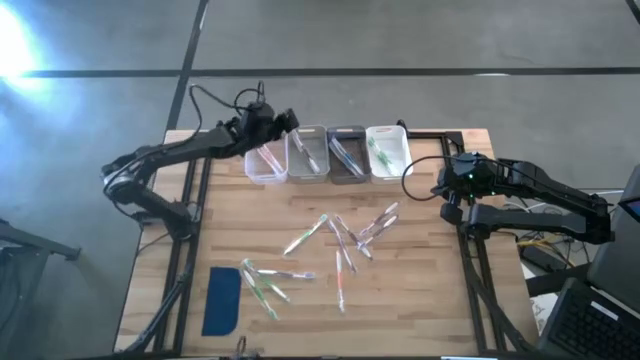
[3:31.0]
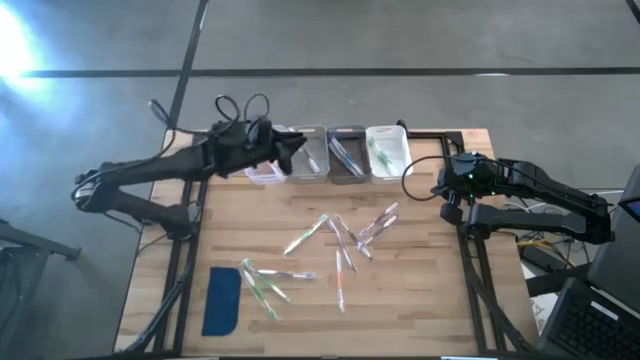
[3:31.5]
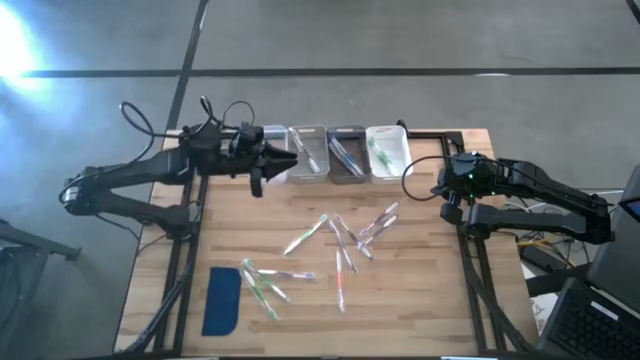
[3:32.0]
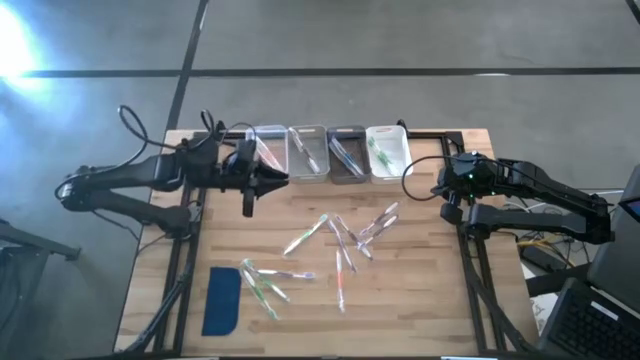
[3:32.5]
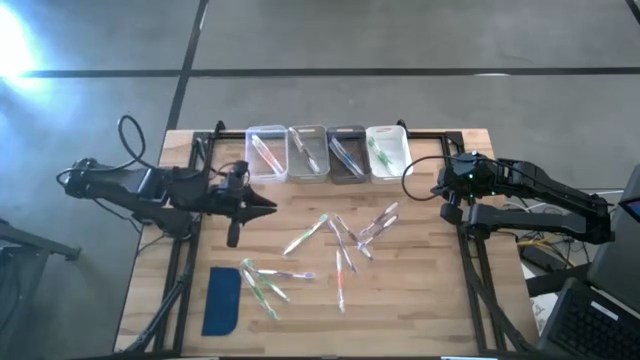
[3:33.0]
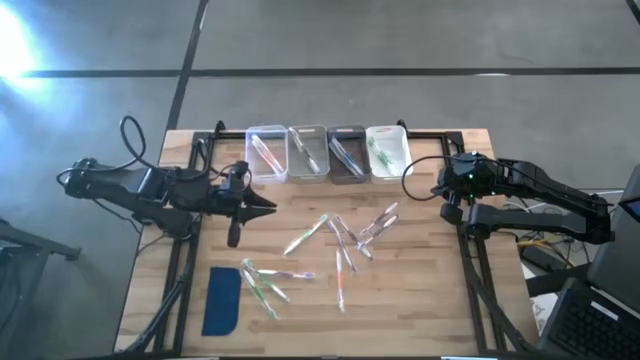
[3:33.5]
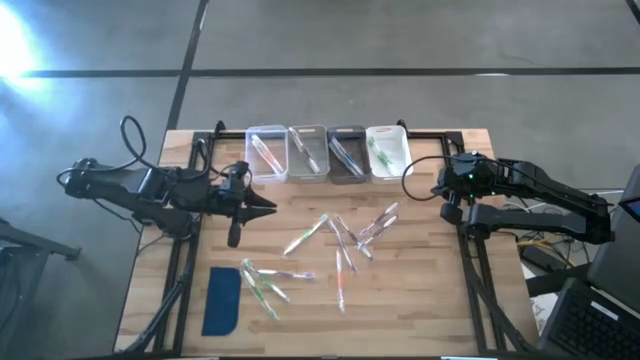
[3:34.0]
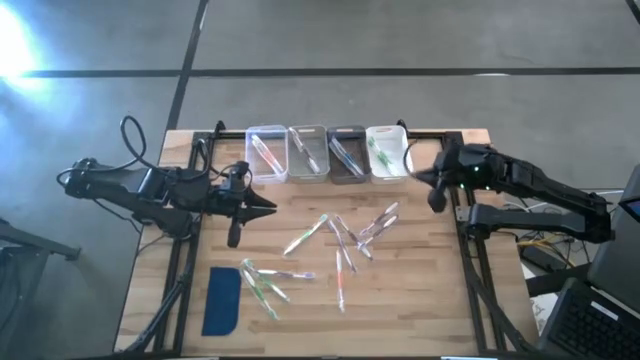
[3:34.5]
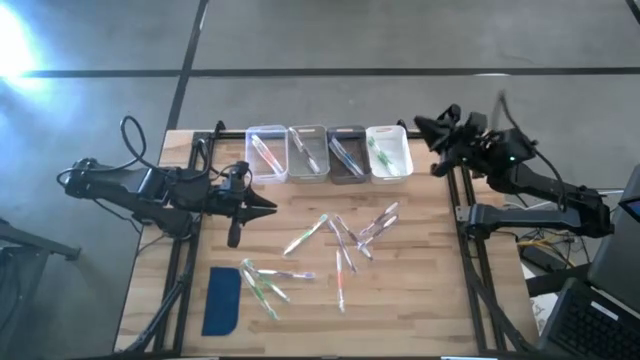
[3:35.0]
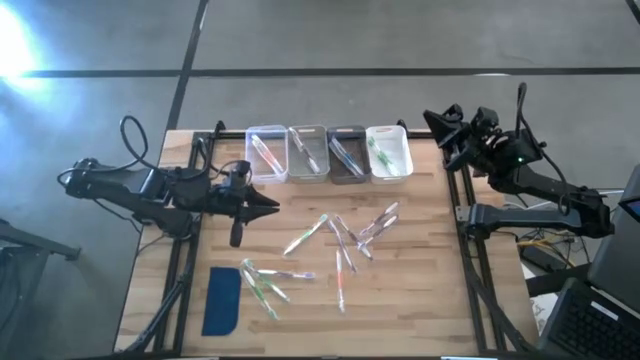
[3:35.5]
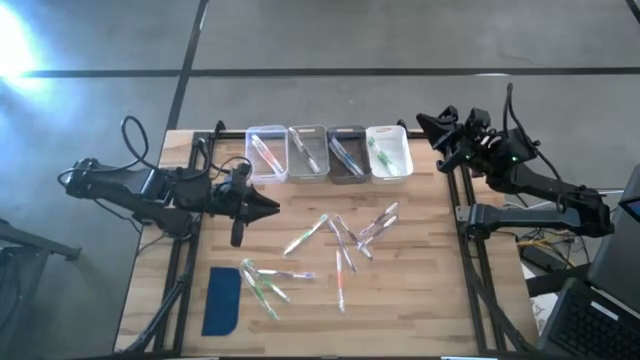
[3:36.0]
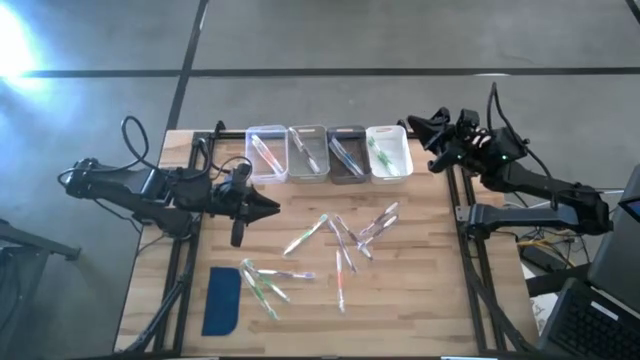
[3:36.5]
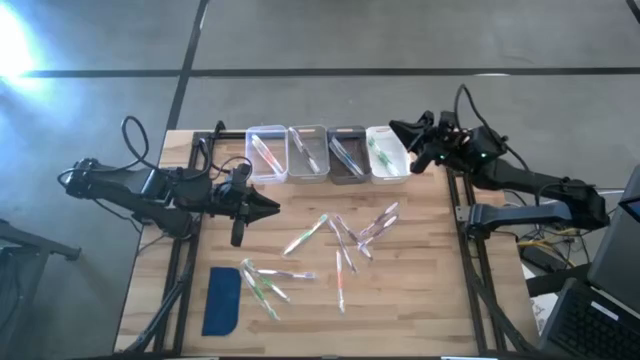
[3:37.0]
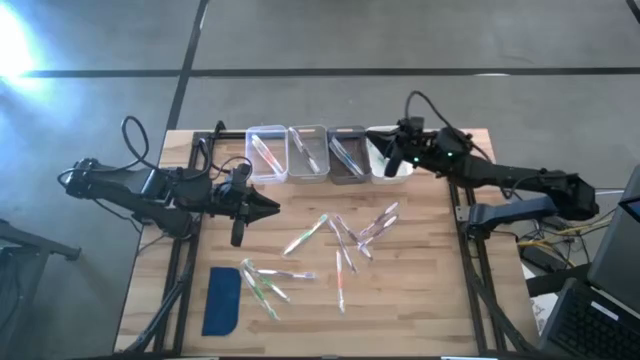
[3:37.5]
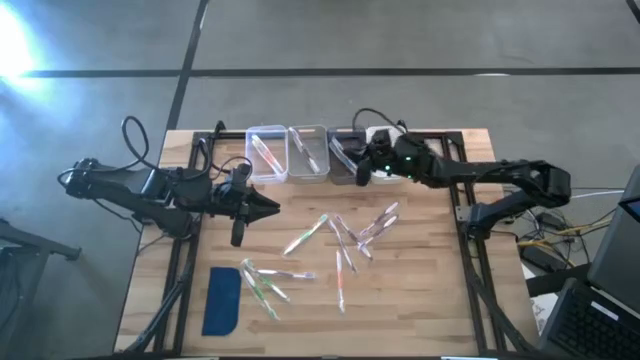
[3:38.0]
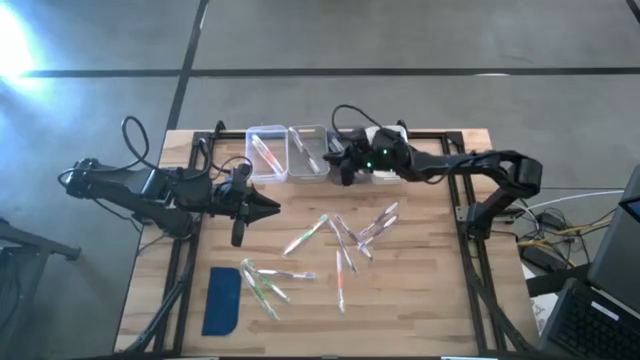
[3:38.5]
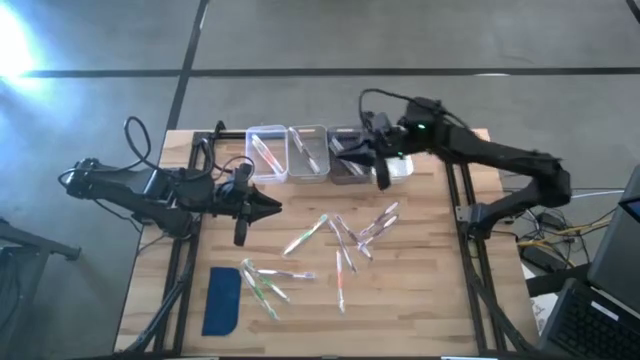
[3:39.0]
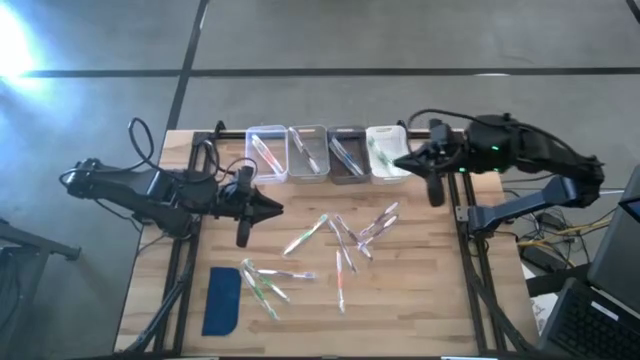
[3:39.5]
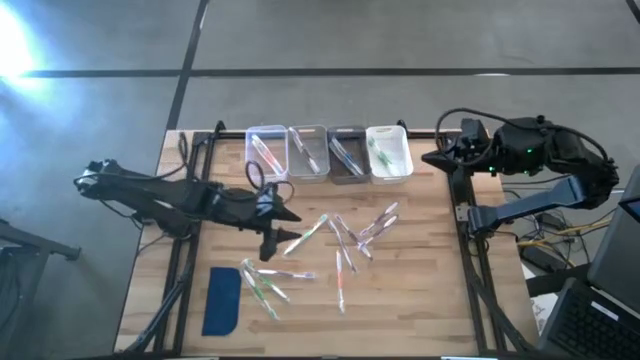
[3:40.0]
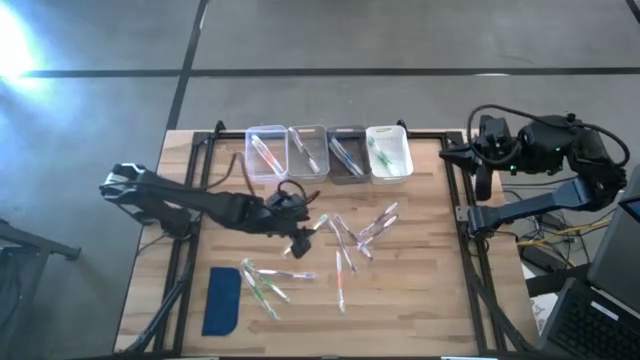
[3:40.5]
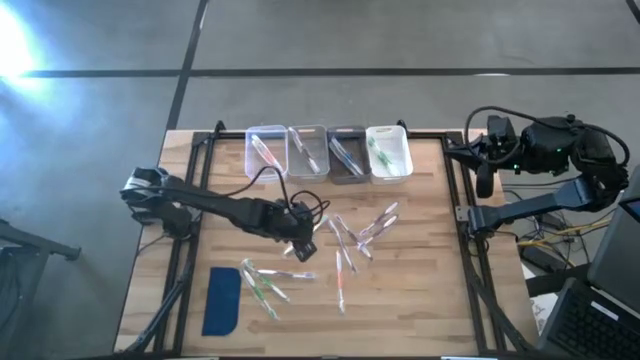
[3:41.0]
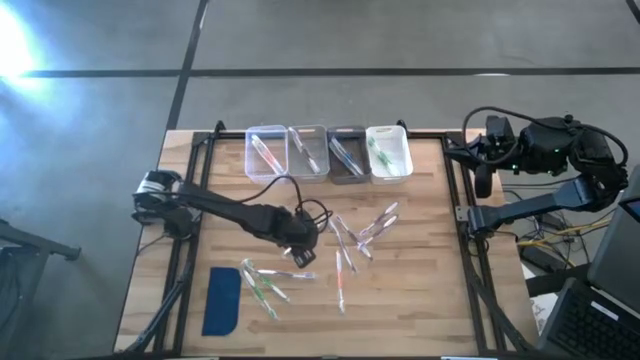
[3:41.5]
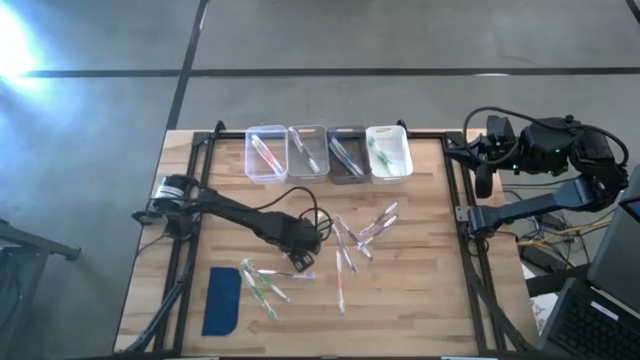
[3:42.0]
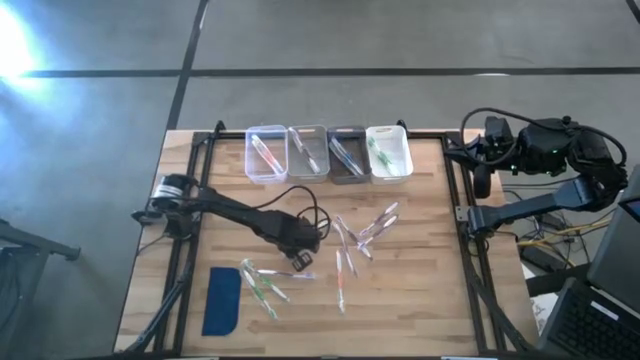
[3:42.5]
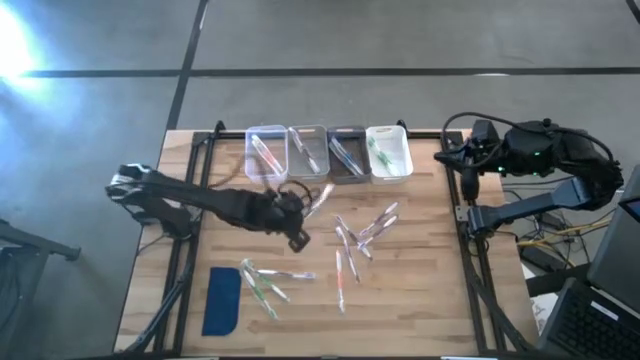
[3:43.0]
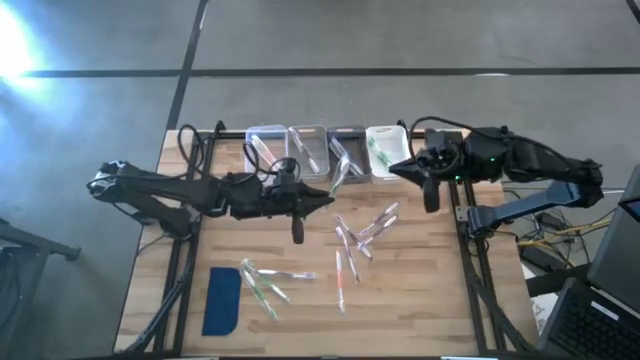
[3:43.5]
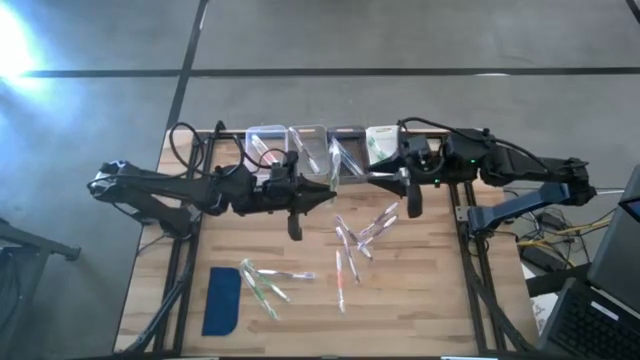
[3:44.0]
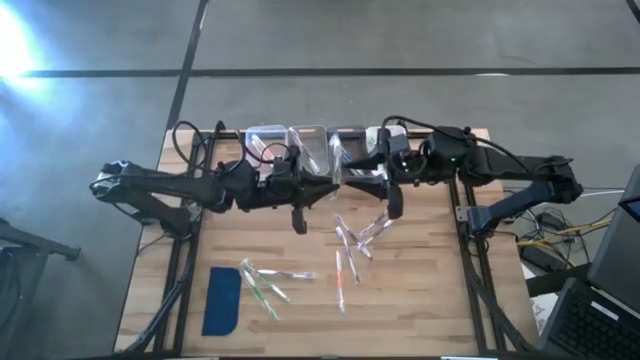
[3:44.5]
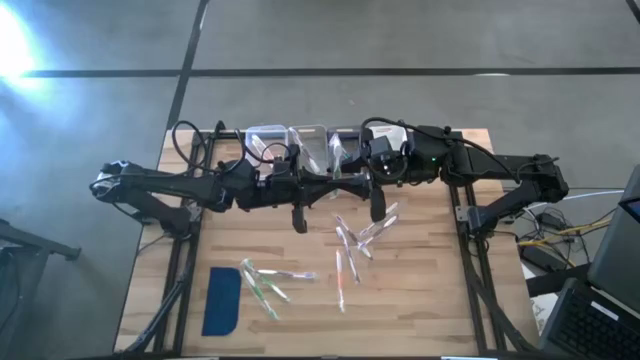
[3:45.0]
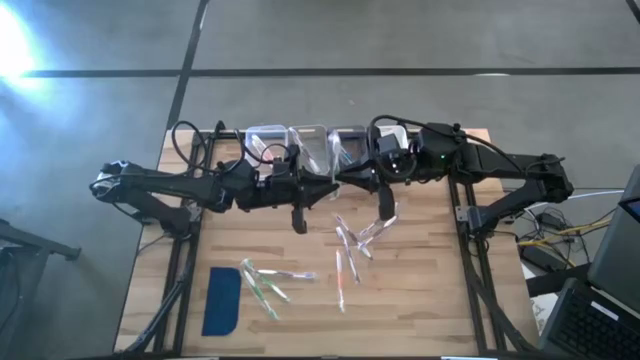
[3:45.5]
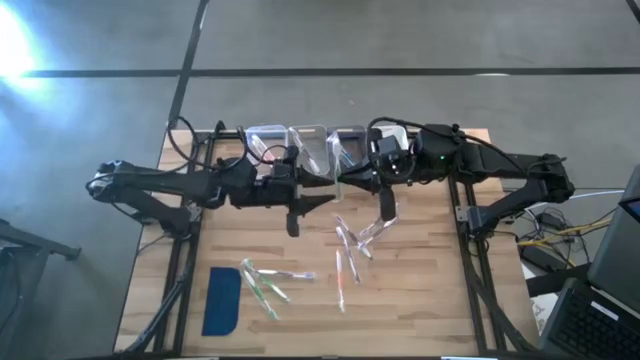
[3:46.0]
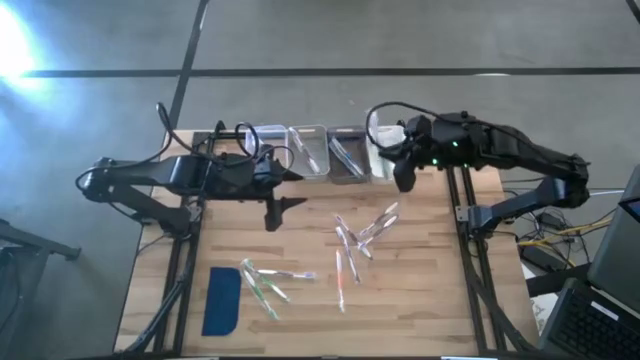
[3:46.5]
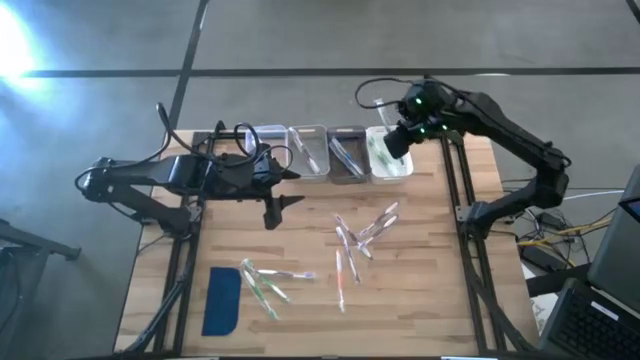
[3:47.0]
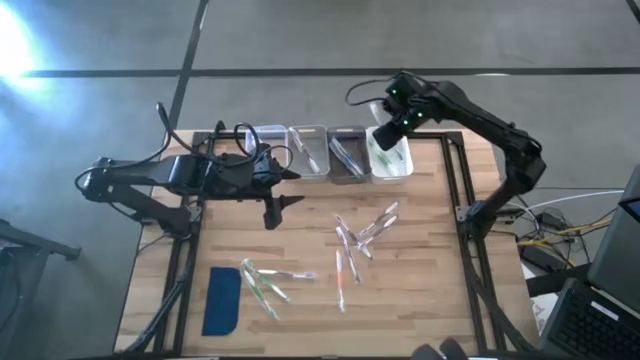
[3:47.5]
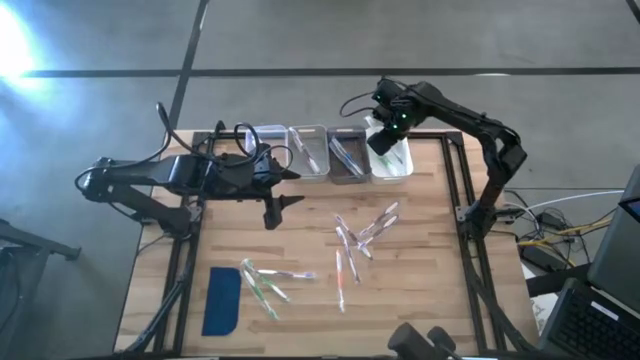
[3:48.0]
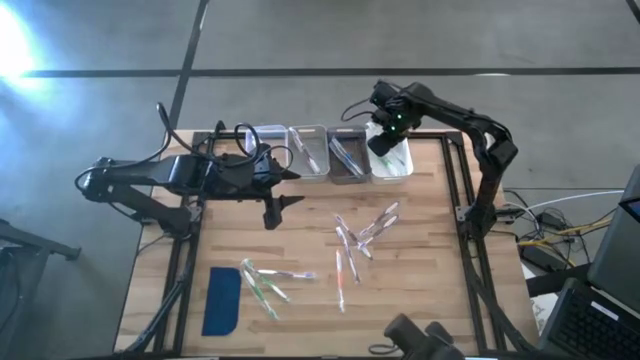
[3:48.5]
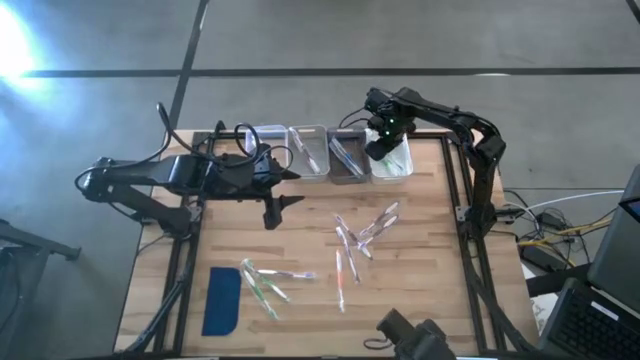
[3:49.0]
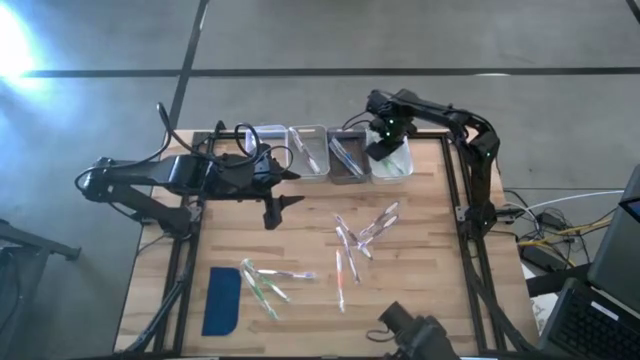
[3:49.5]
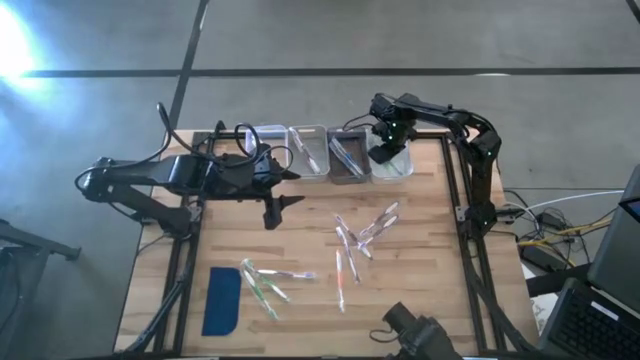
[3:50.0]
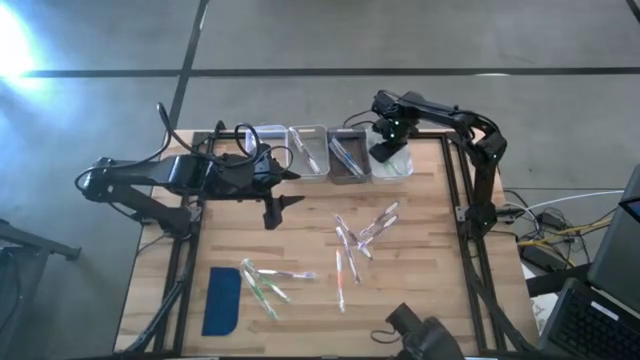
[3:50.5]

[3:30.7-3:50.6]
Task: Pick & Place Toothbrushes
Put the green toothbrush into the white bin

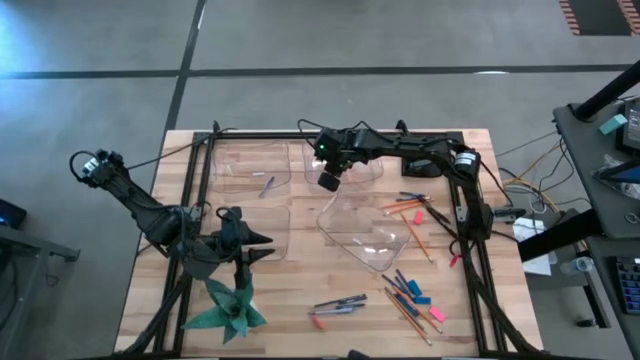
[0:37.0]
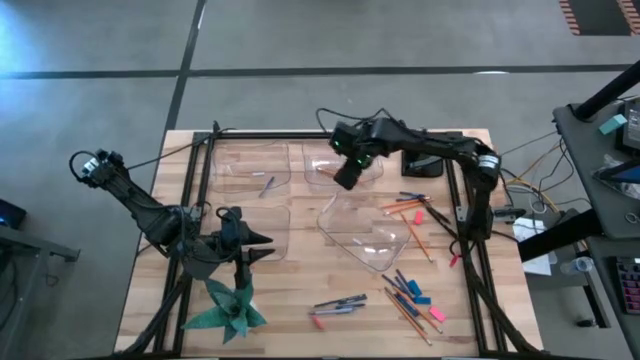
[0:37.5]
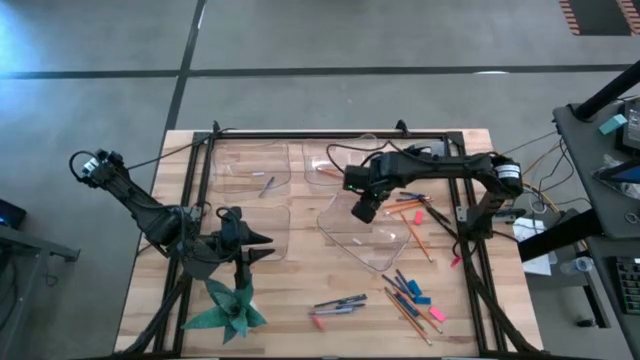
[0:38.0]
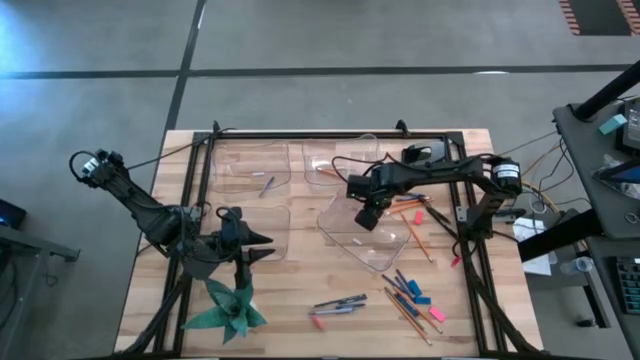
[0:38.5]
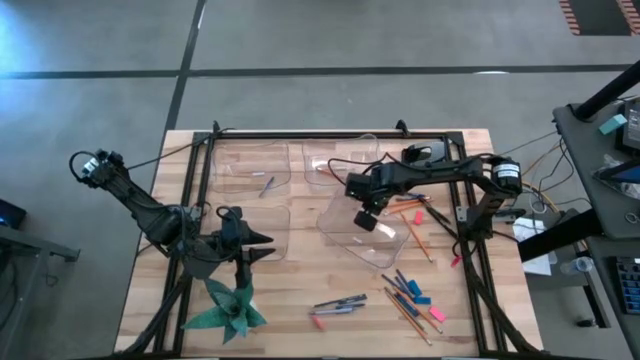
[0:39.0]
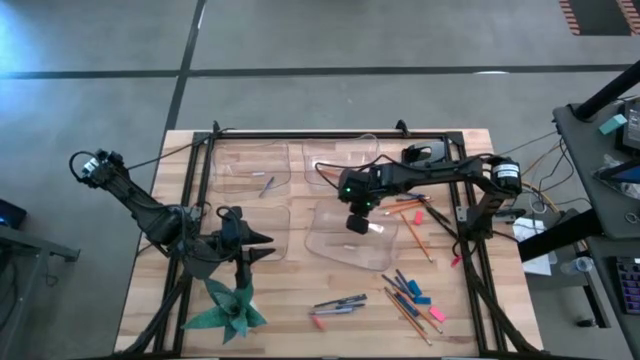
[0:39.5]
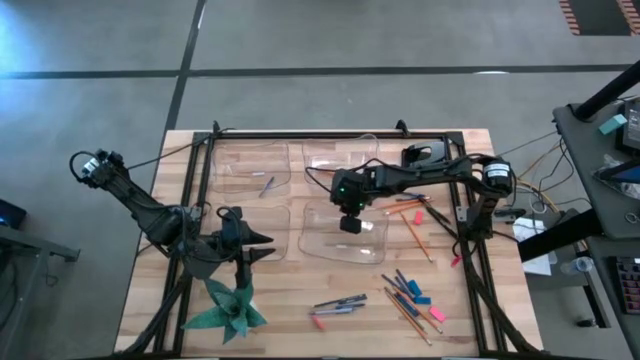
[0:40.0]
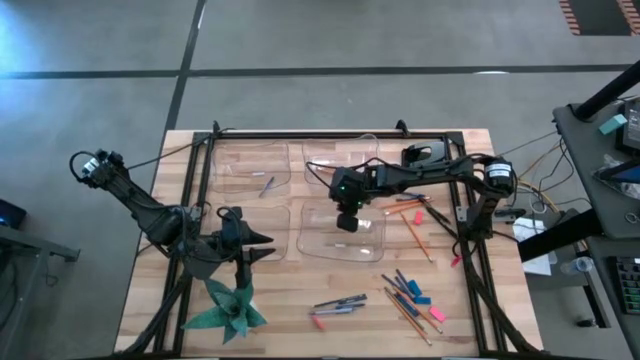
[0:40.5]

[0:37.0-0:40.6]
Task: Sort crayons/erasers/pens/pencils in bins
Adjust the bottom right transparent bin
